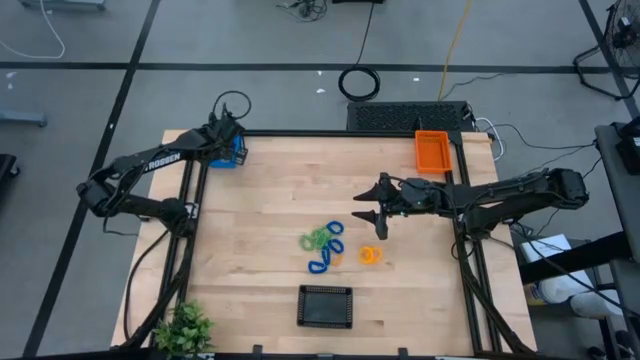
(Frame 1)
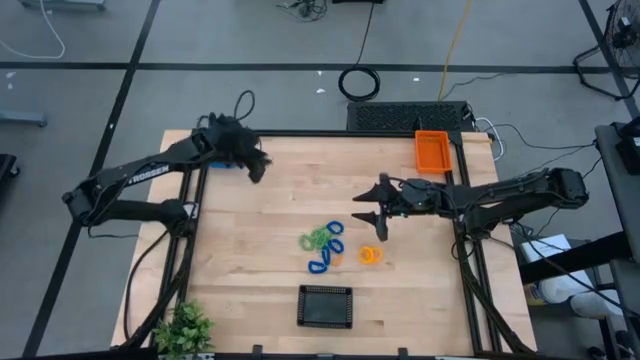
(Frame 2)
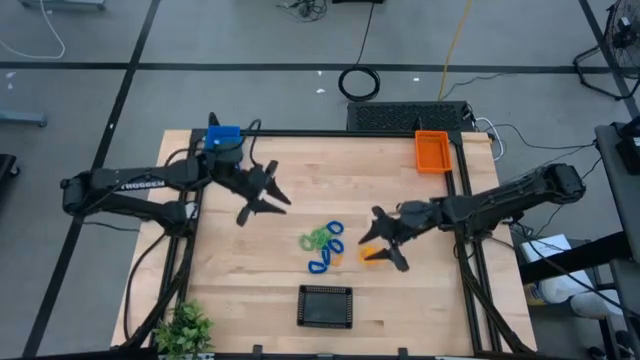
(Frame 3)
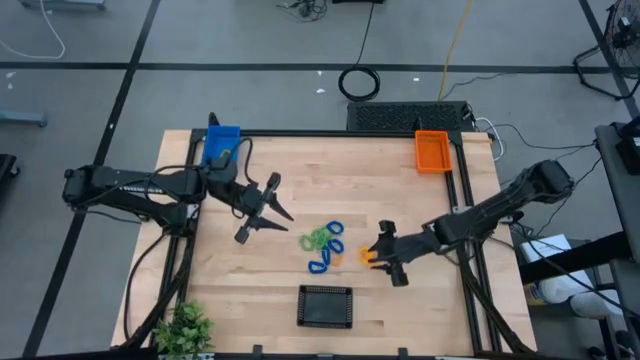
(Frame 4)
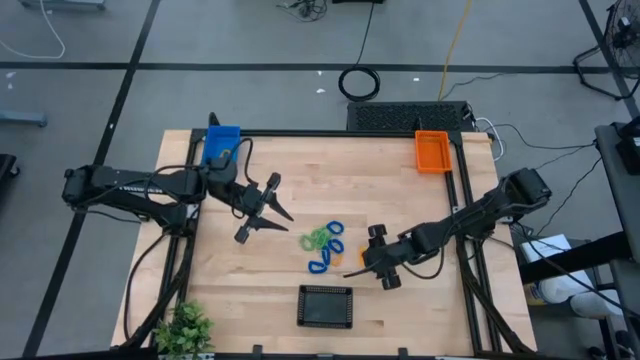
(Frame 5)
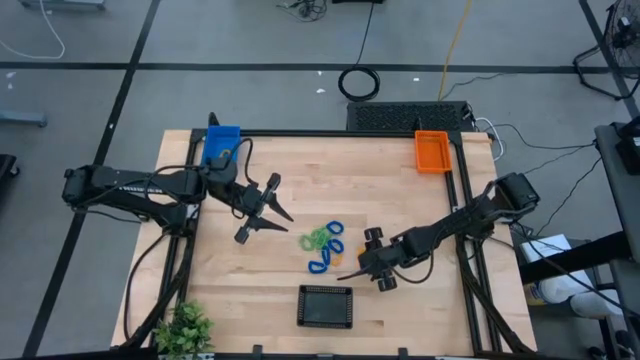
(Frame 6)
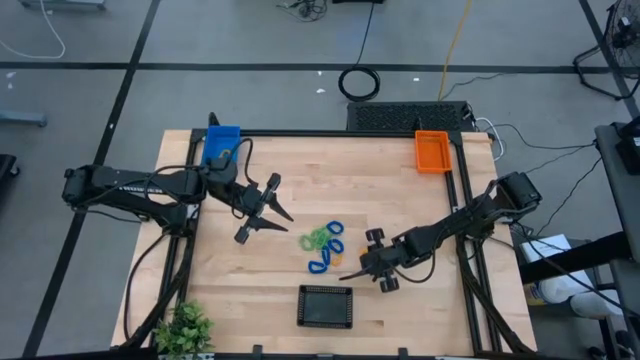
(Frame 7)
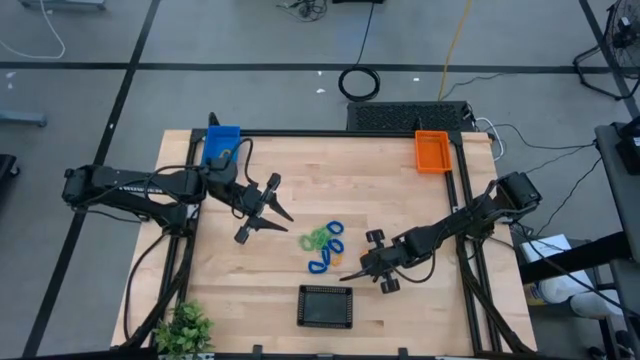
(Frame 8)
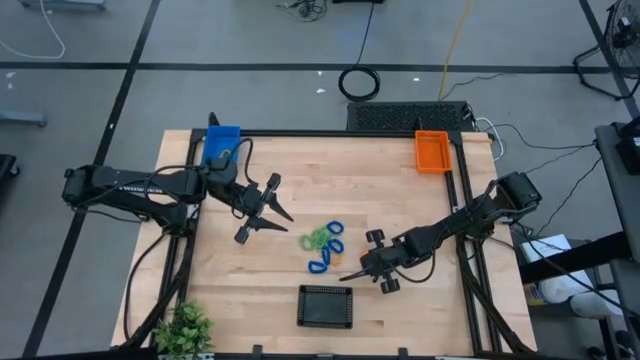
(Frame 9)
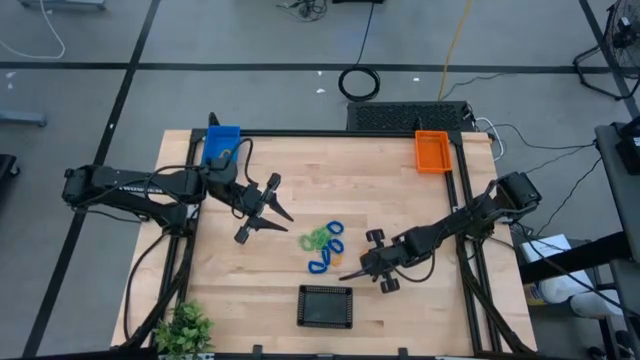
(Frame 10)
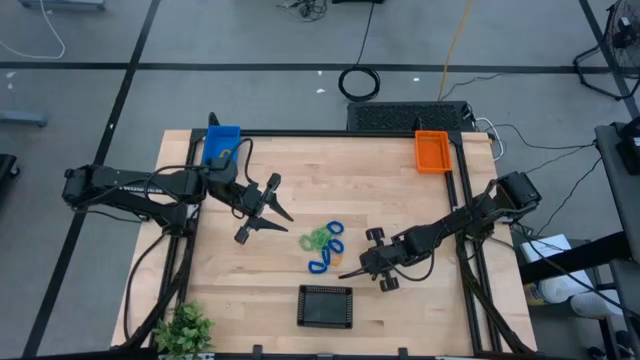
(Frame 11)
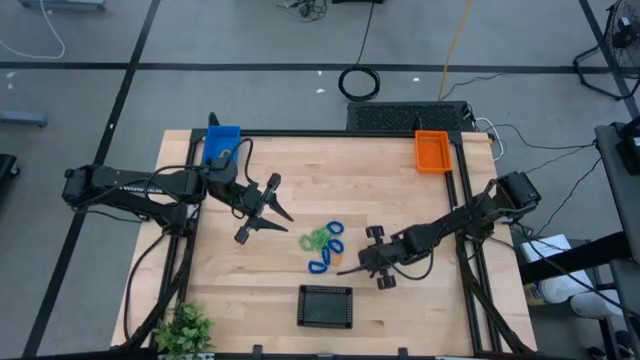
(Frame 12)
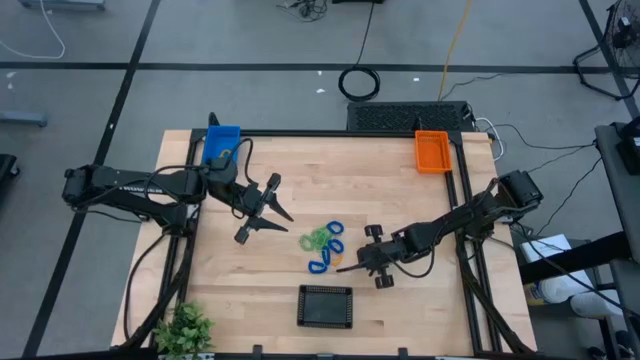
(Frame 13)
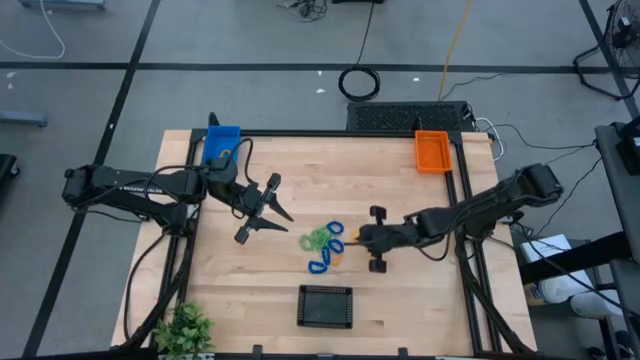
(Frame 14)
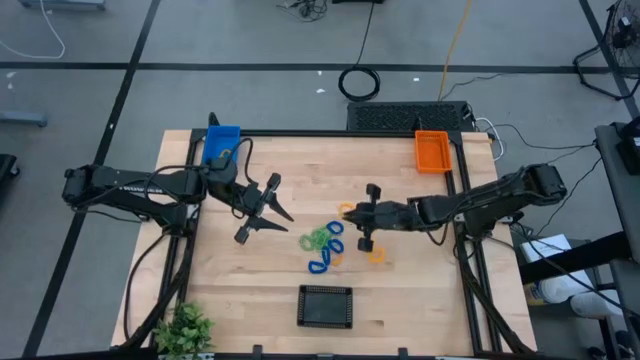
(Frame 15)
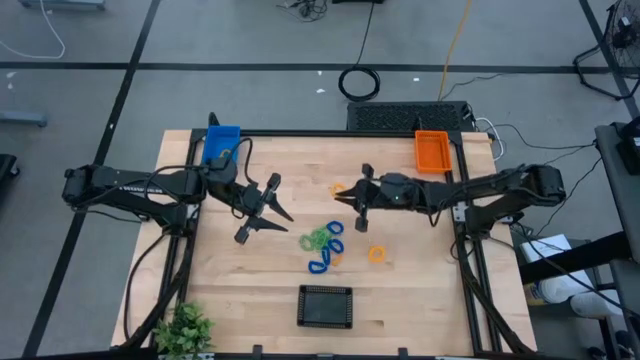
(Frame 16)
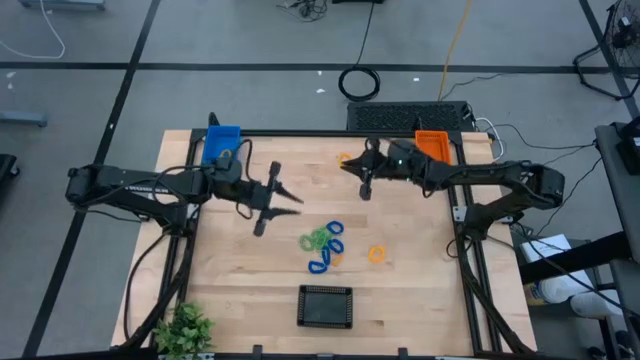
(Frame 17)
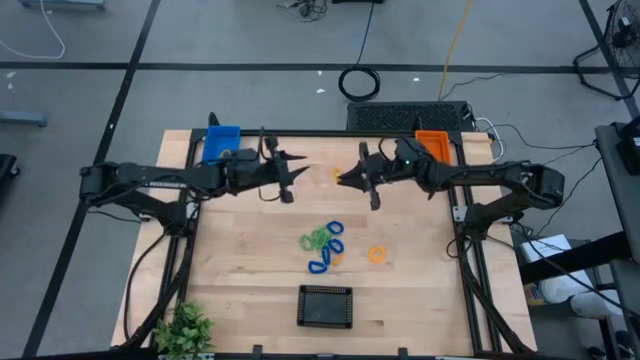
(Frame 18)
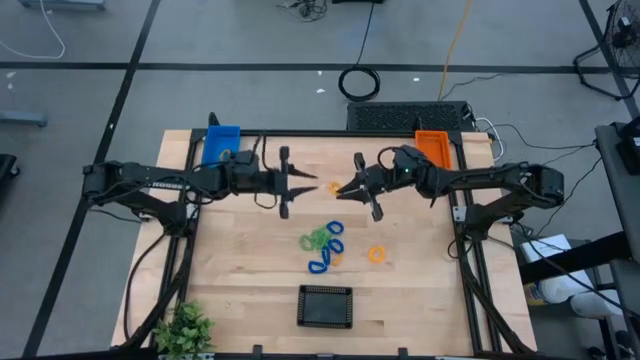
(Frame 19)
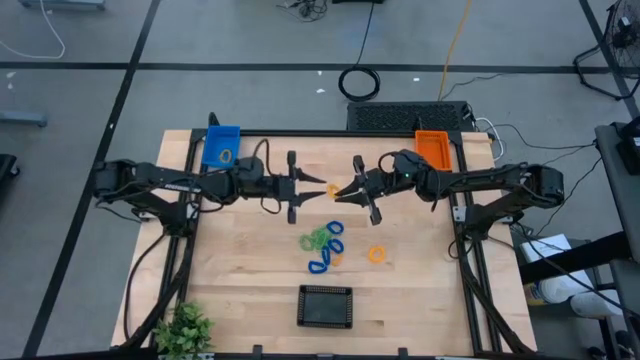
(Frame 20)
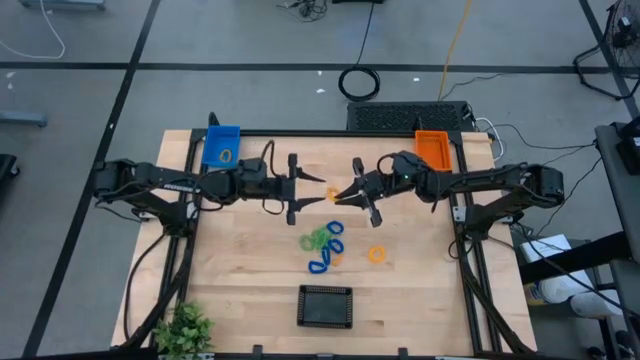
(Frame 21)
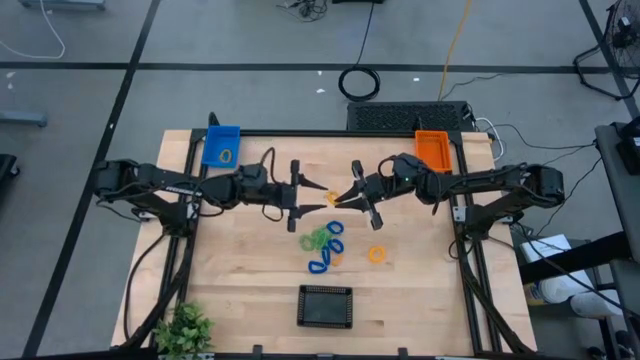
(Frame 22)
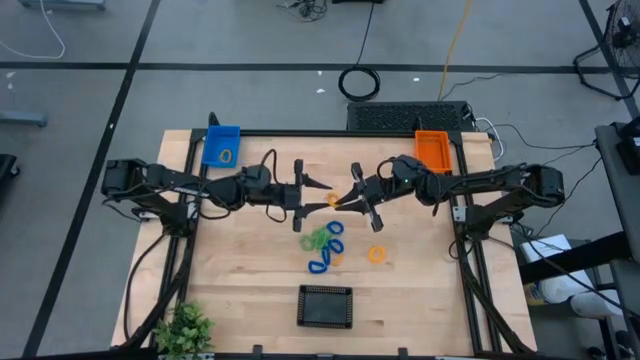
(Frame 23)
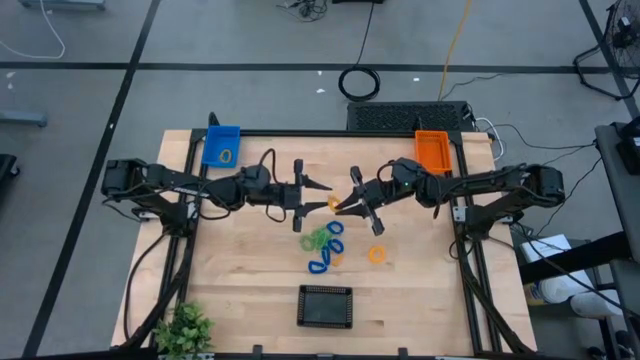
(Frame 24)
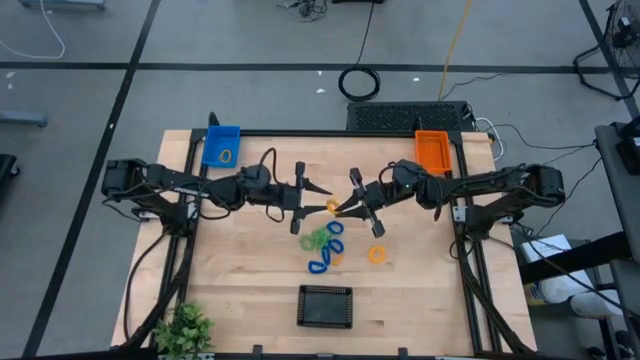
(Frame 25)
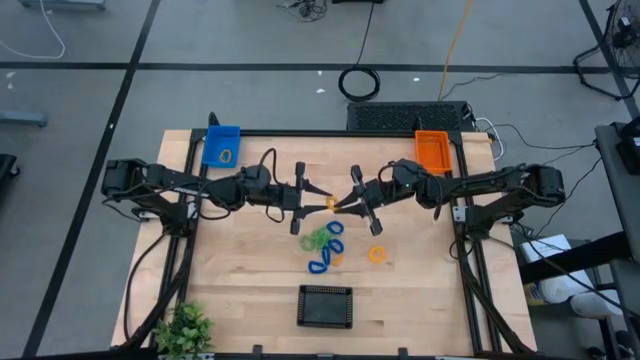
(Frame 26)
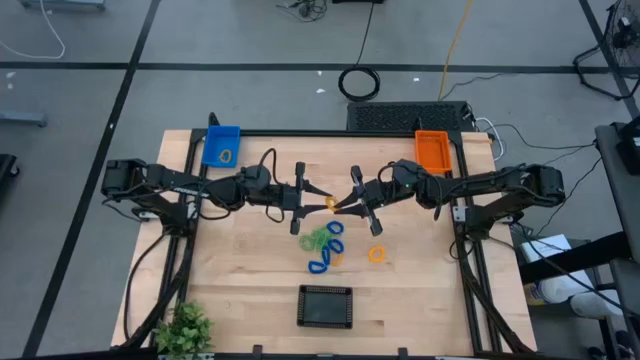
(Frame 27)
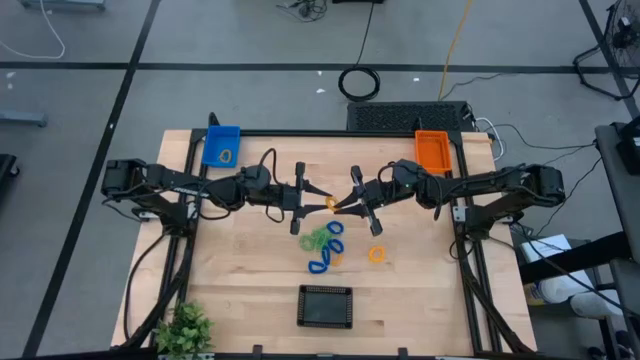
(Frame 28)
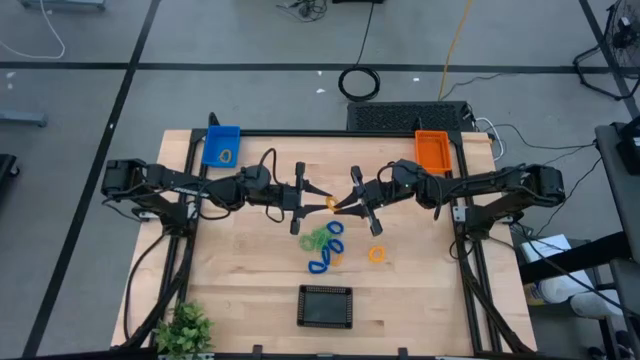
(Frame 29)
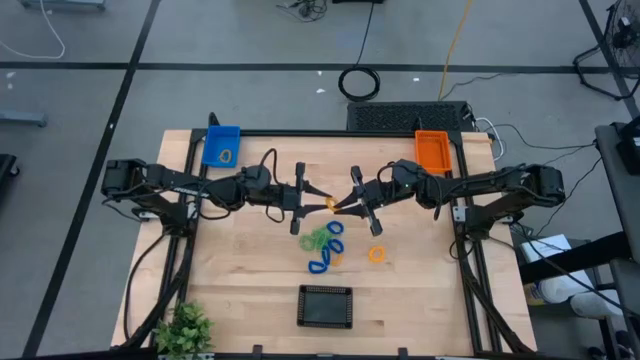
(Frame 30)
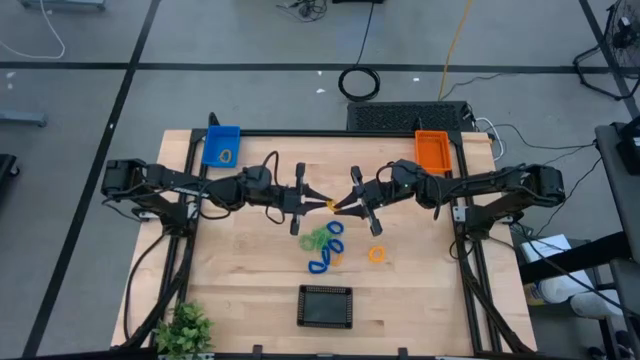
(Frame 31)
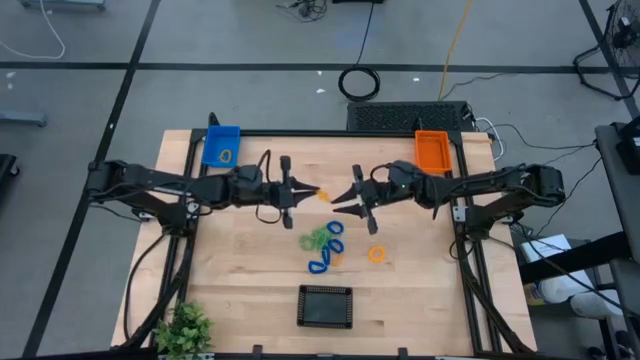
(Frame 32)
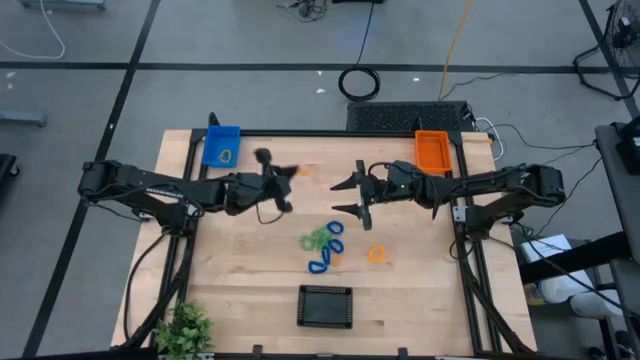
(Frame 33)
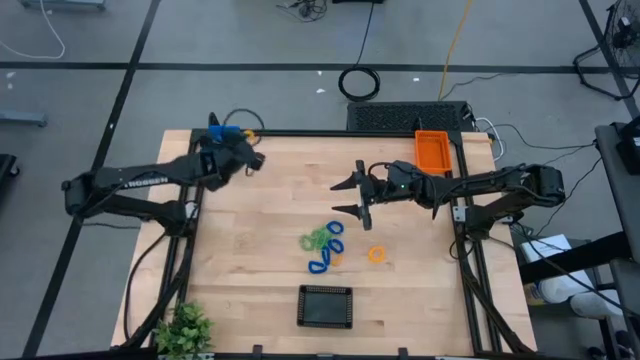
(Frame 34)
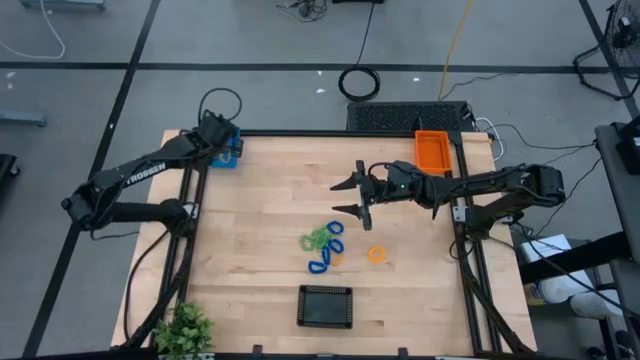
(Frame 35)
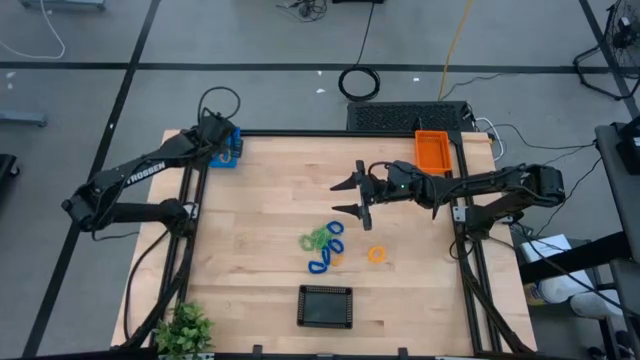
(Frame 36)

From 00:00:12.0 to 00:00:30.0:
Task: Sort spring keychains into baskets
Put the orange spring keychain into the blue basket

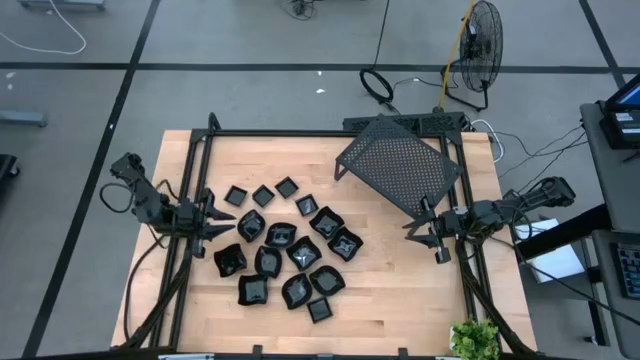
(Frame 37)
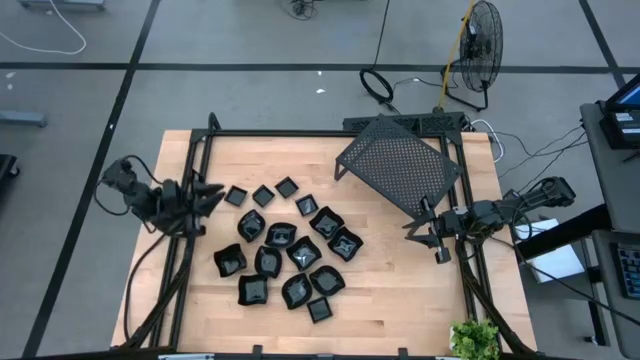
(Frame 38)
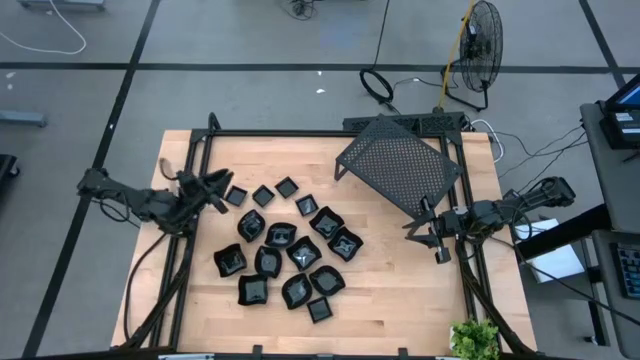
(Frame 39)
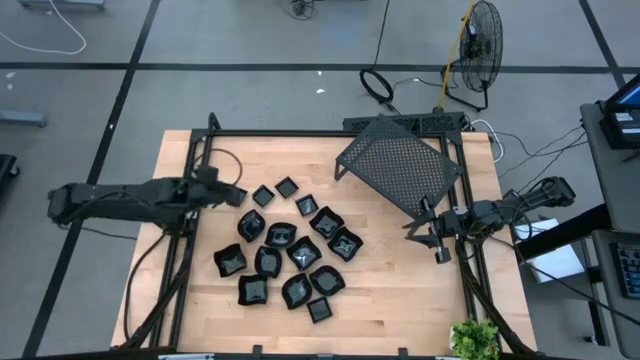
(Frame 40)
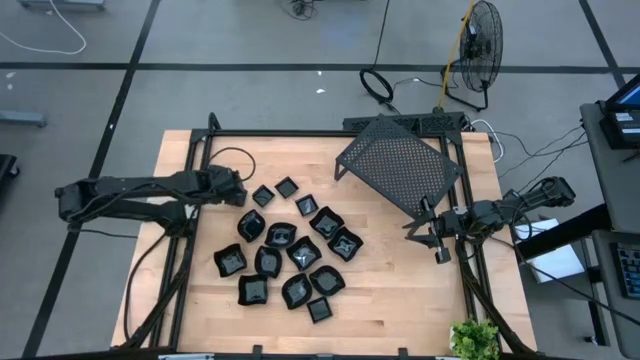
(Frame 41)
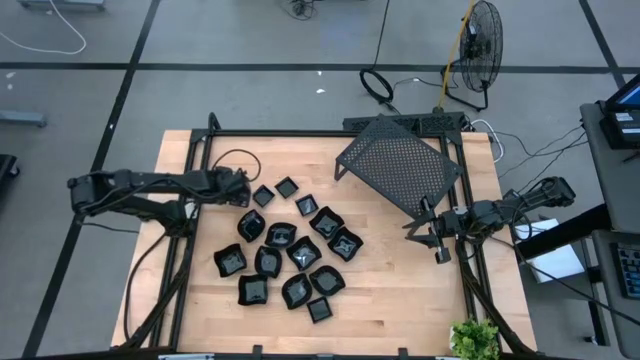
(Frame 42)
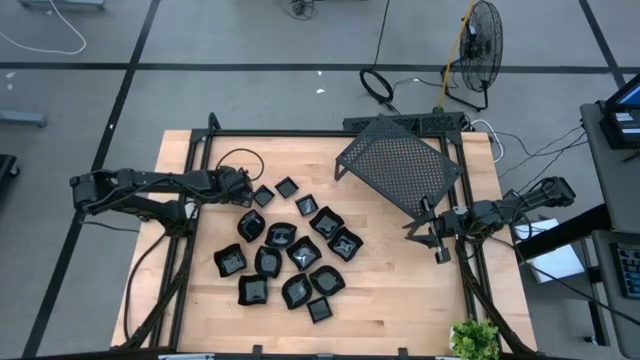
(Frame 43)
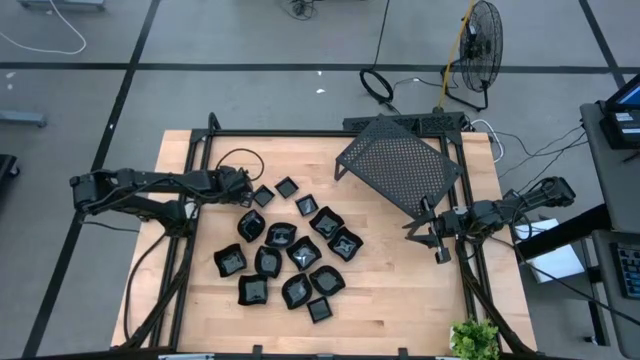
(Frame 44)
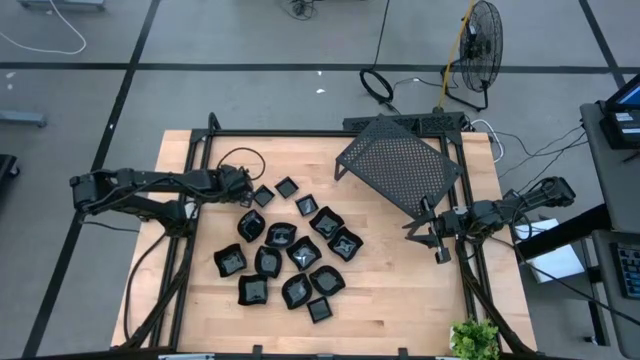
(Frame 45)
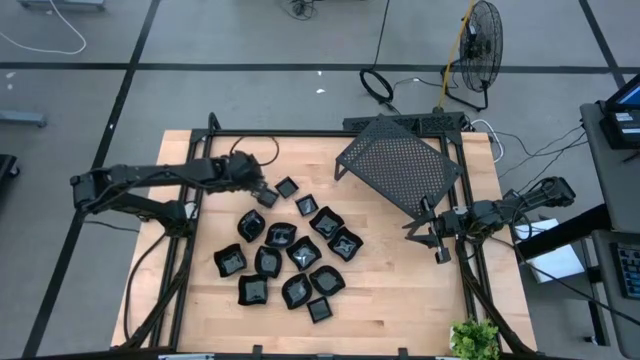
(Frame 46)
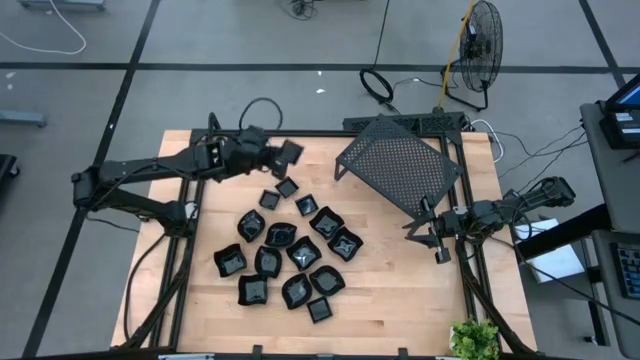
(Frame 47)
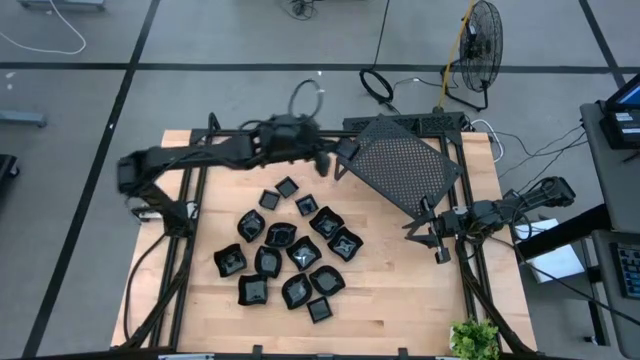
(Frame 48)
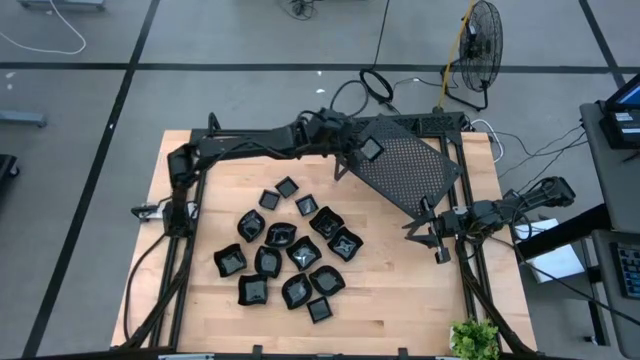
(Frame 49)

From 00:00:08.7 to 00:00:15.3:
Task: Pick & Place Mini shaped plates
Put the black square plate on the shelf
